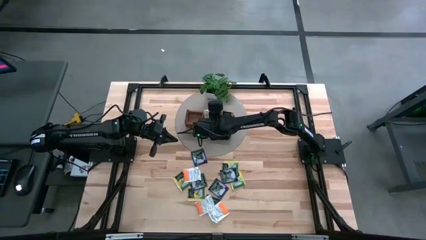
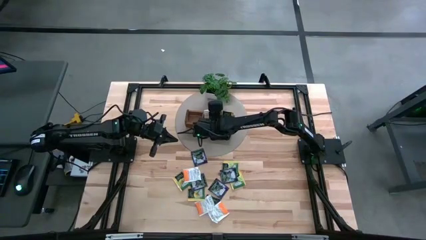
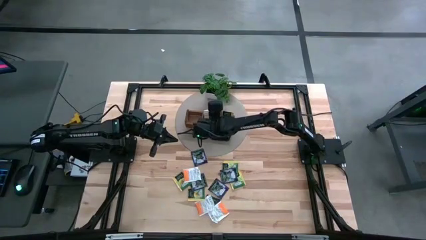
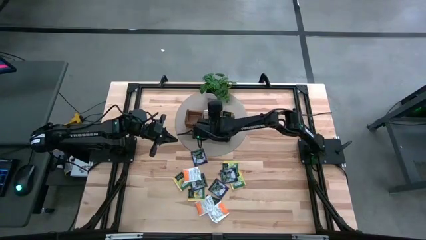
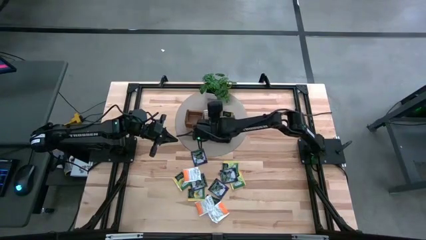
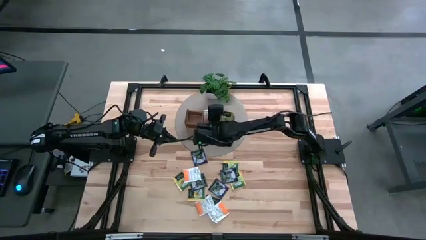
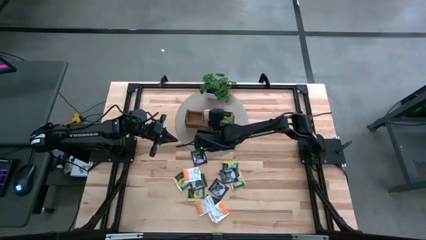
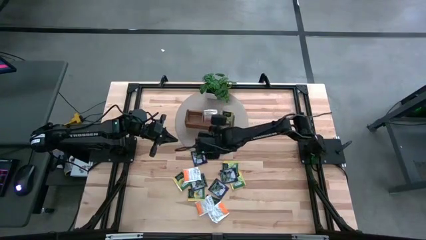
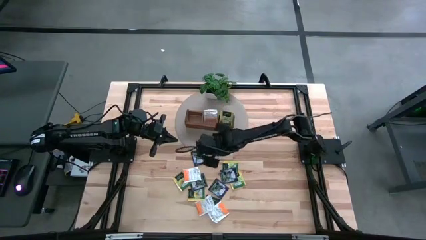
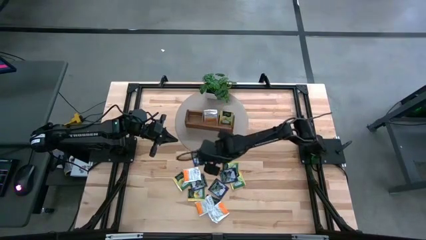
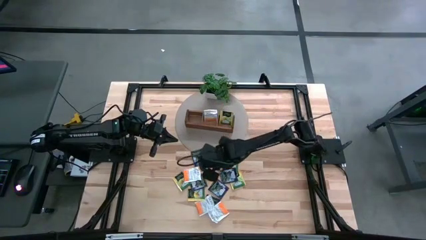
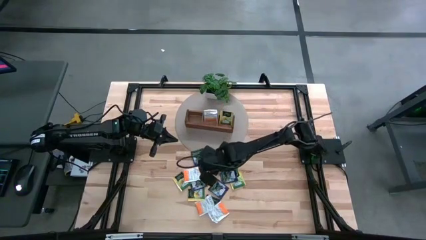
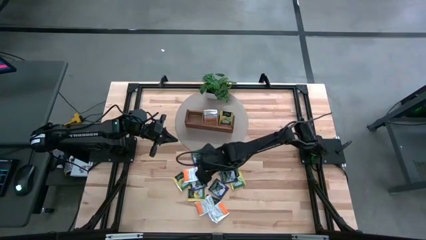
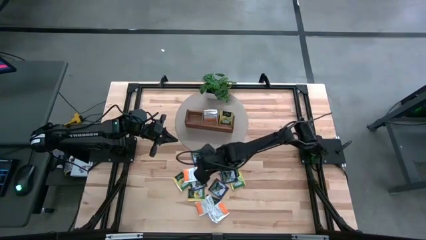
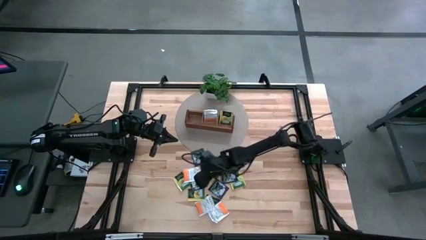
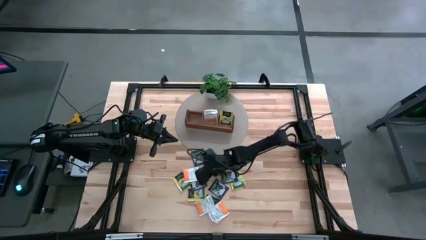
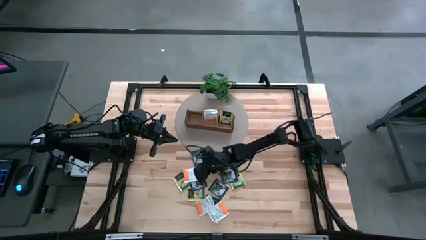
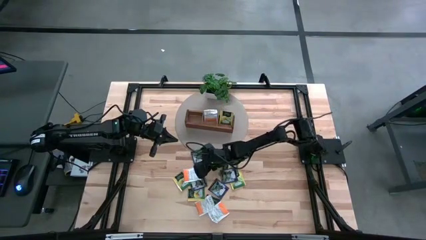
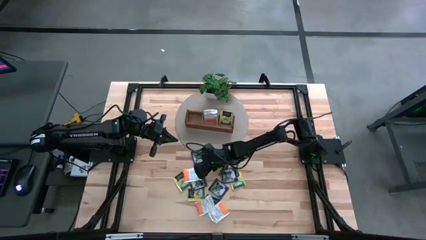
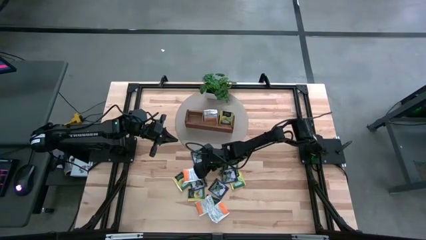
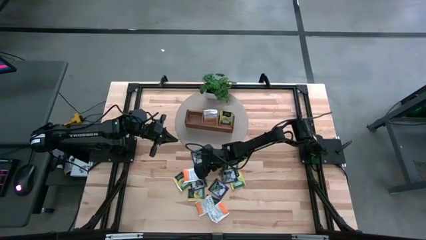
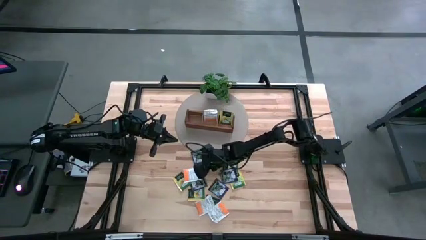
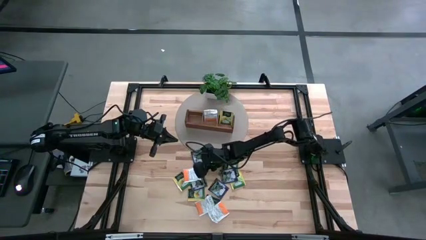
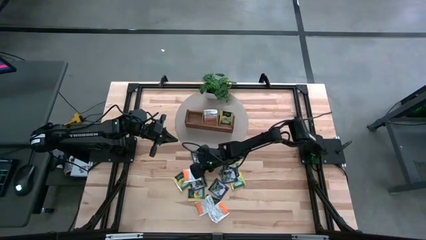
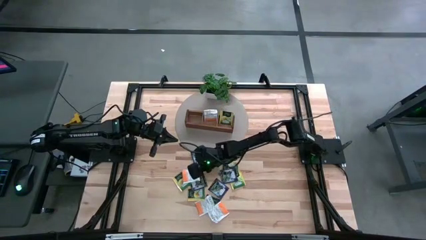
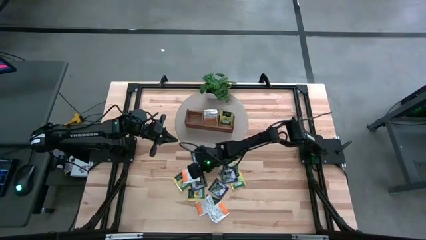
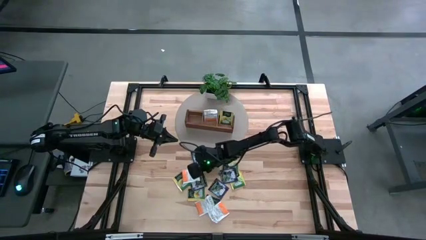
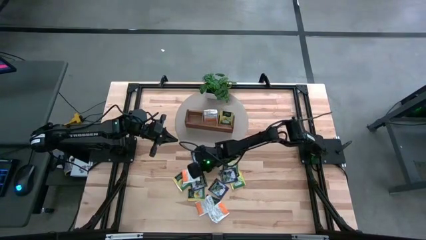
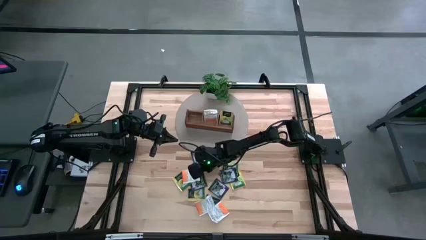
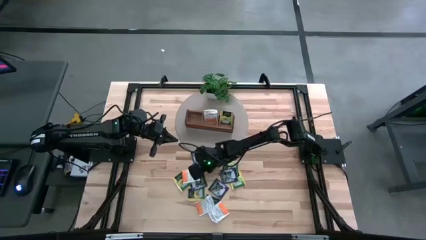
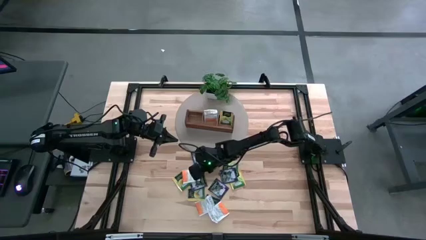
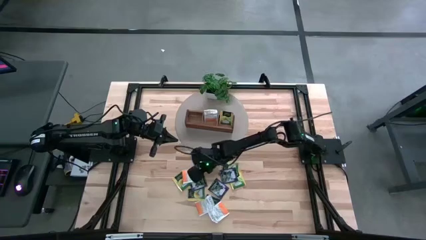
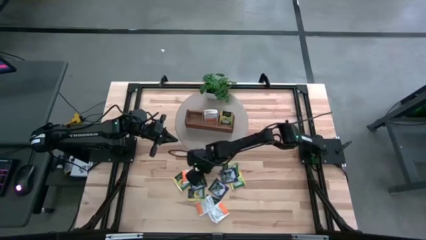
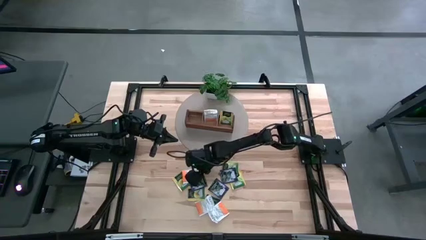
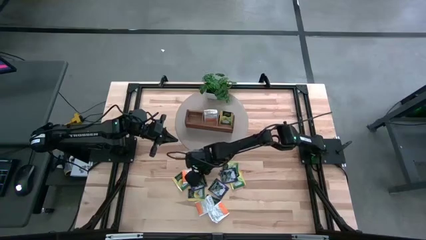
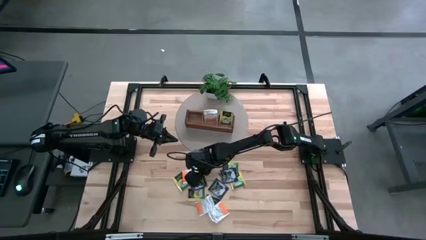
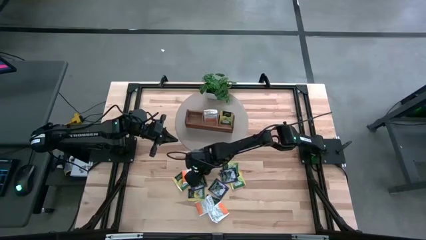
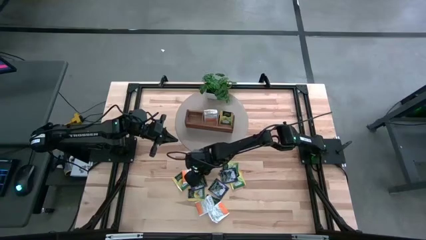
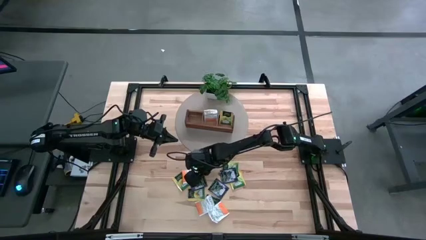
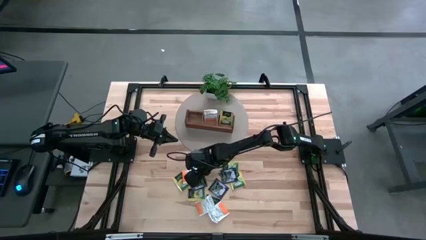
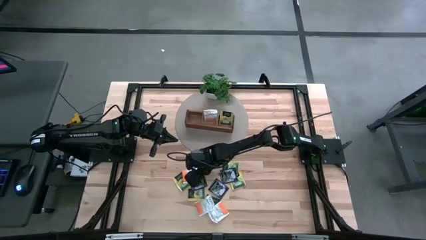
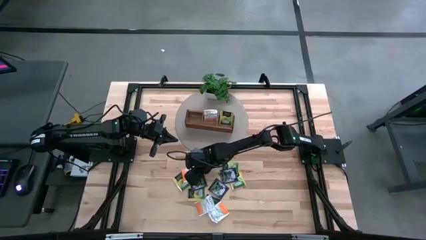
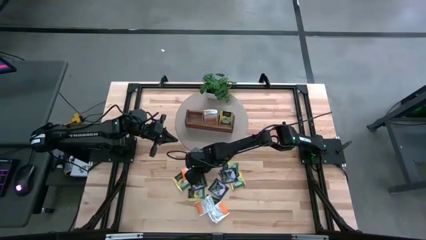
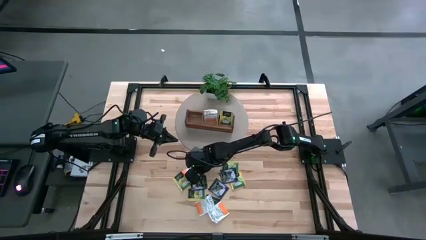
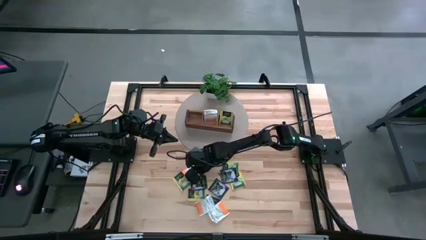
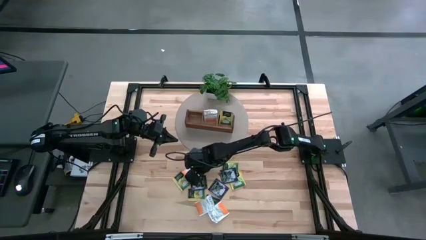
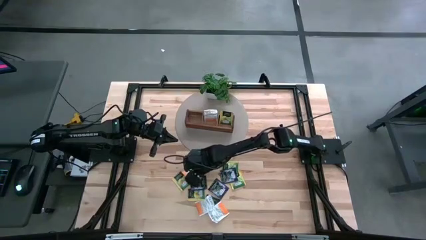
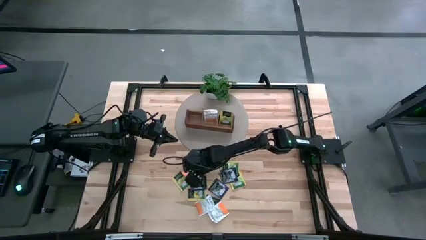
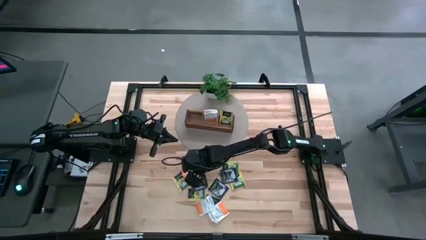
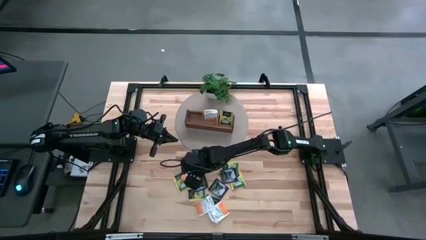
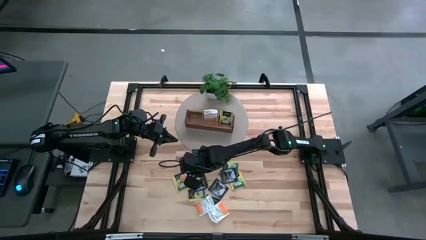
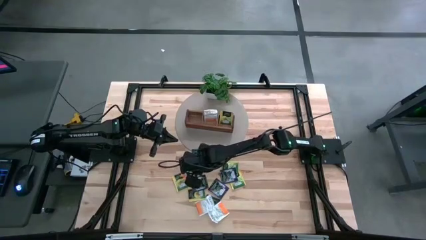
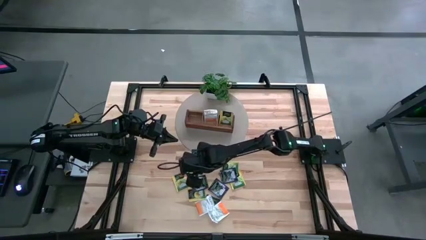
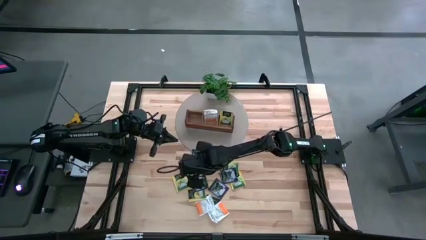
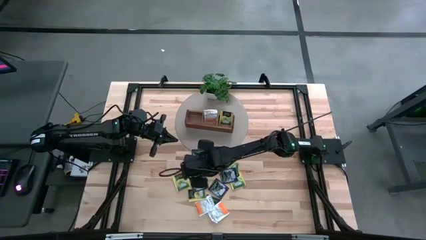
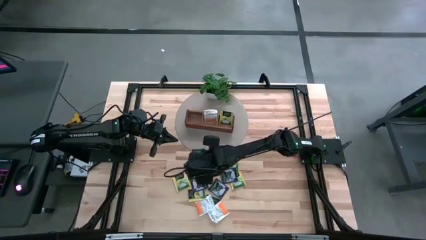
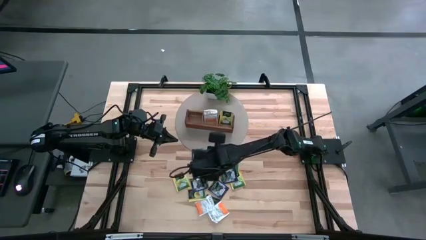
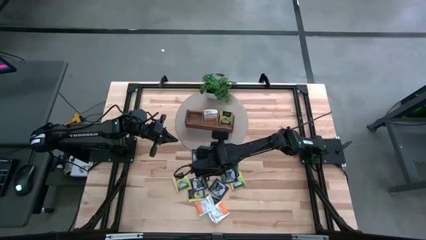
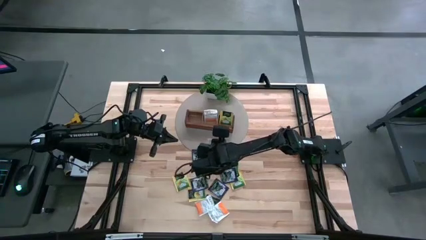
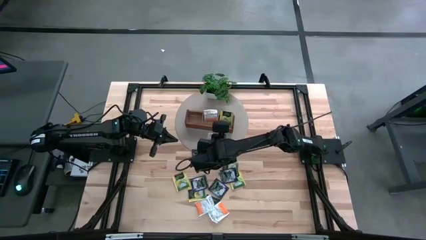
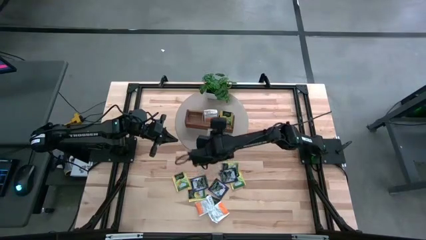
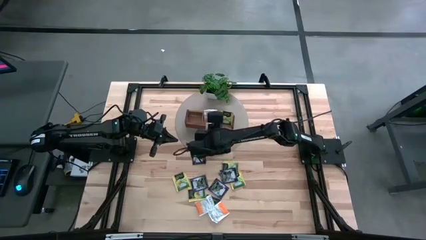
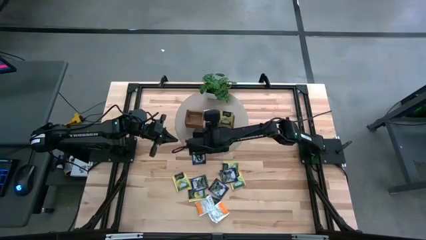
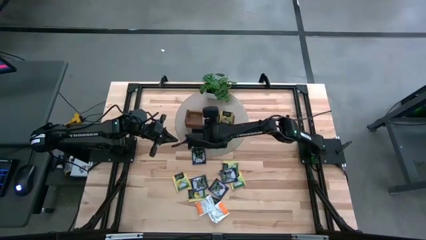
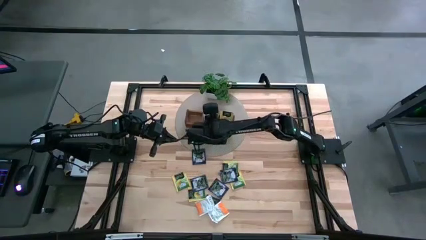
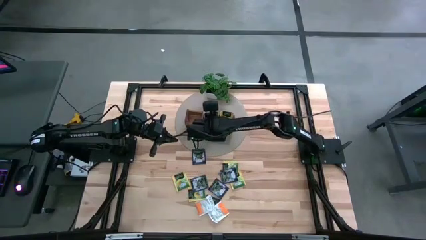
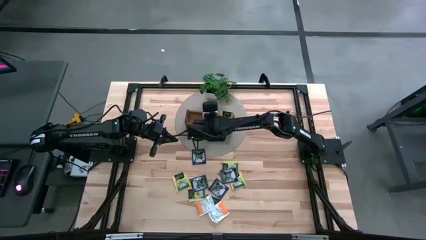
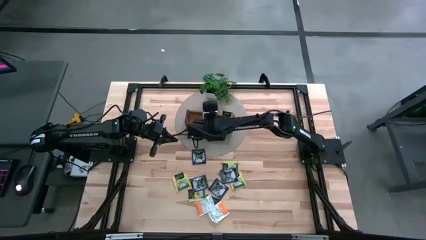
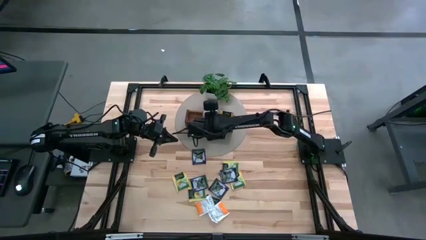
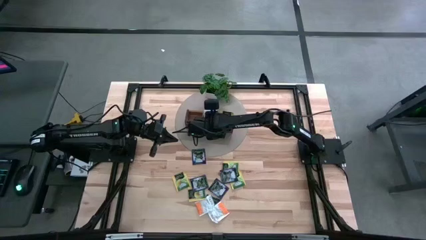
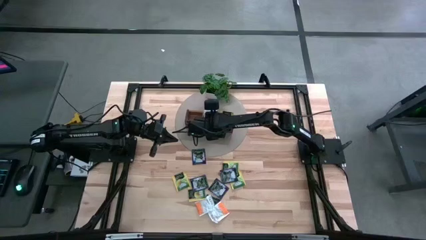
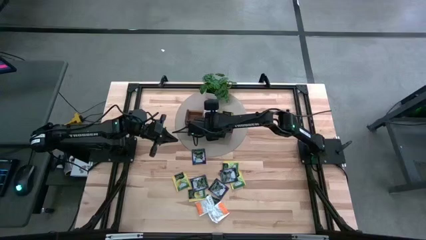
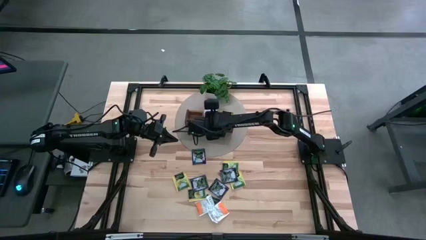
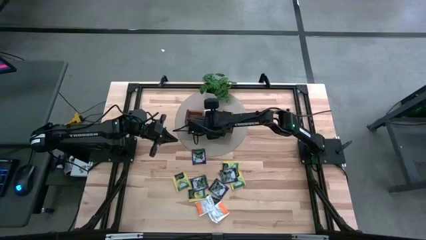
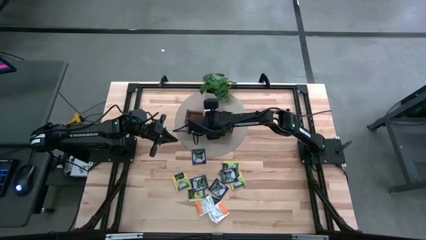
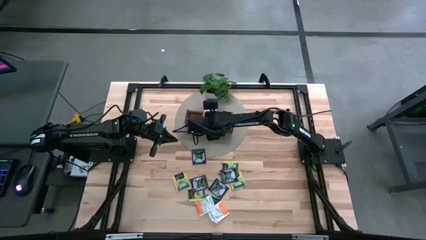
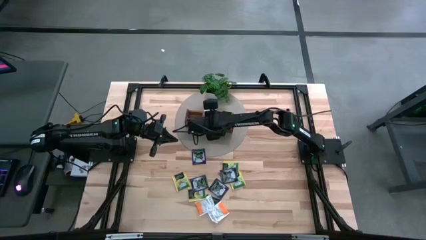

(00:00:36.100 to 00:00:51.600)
Task: Pick & Place Tea
Put the top white tea bag into the middle section of the wooden organizer
